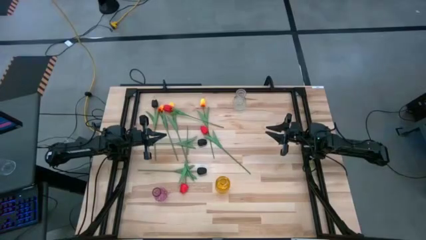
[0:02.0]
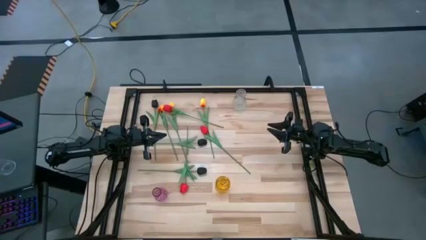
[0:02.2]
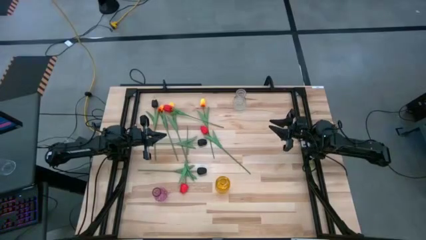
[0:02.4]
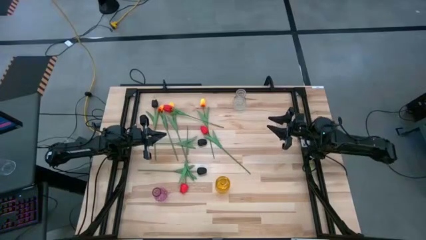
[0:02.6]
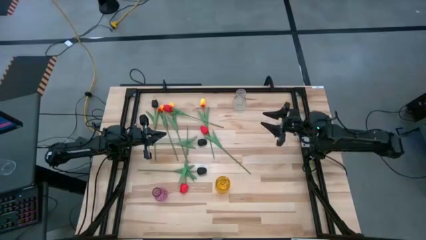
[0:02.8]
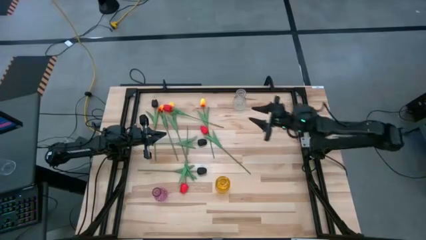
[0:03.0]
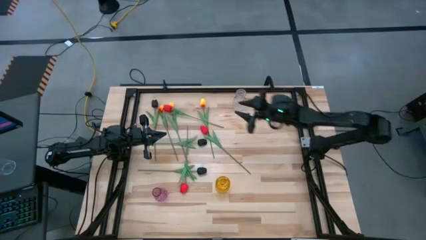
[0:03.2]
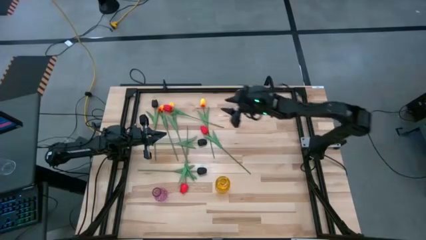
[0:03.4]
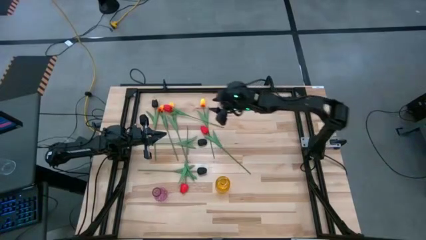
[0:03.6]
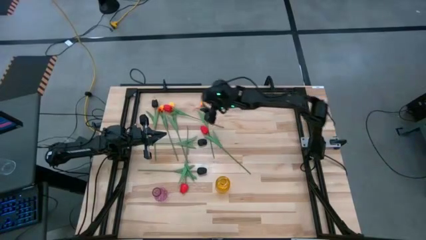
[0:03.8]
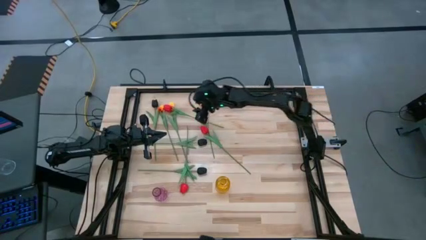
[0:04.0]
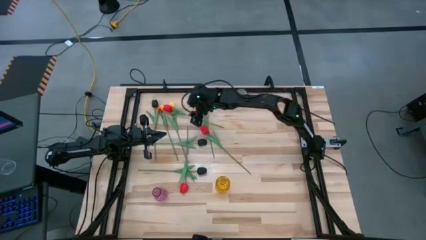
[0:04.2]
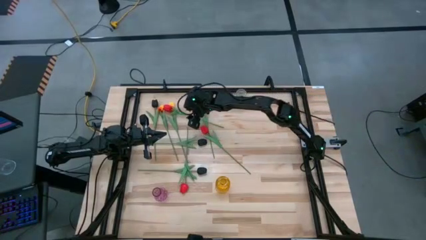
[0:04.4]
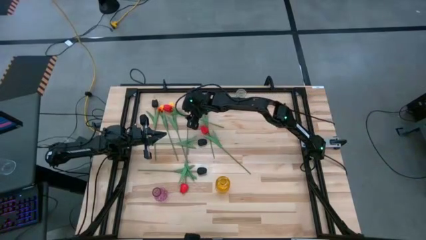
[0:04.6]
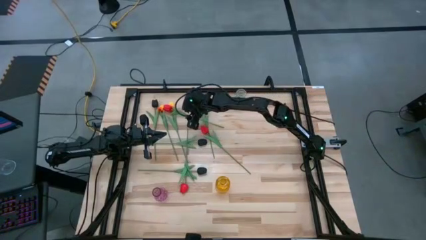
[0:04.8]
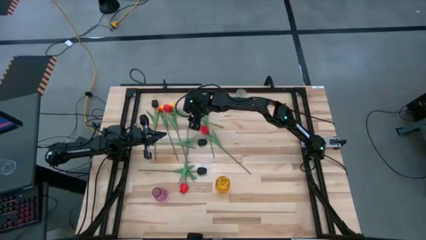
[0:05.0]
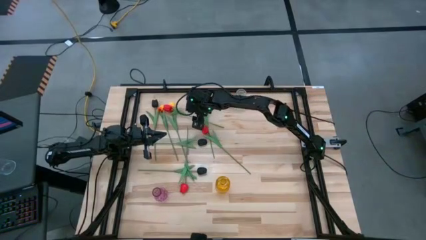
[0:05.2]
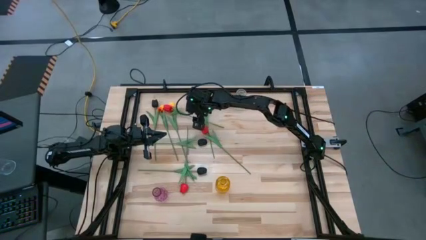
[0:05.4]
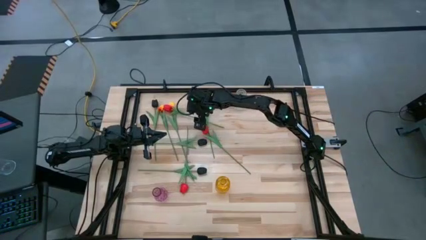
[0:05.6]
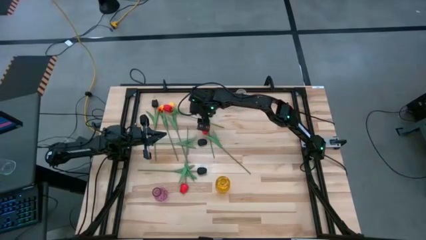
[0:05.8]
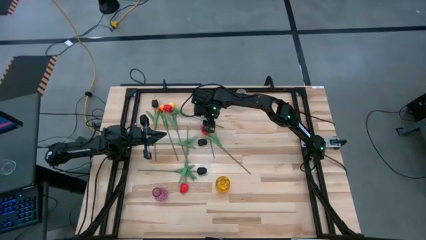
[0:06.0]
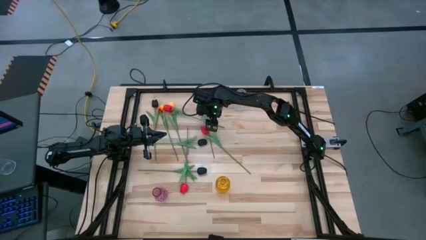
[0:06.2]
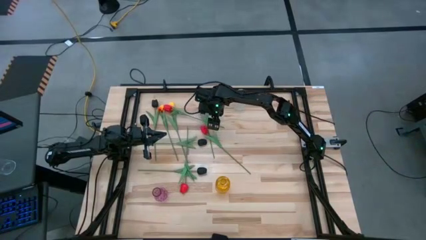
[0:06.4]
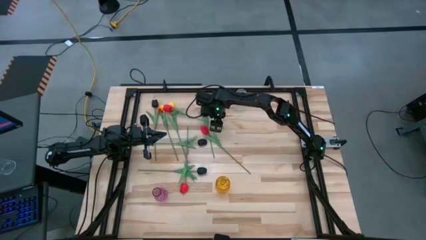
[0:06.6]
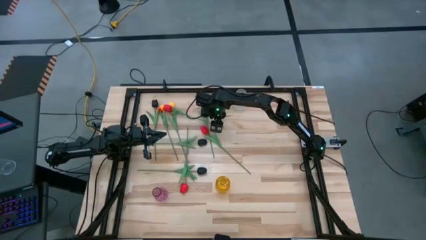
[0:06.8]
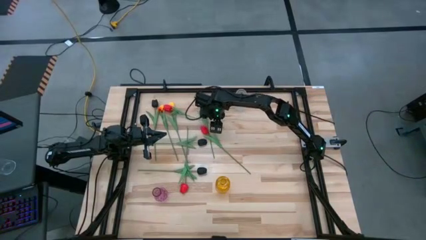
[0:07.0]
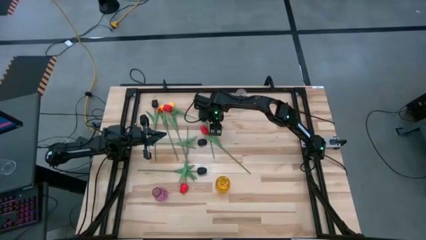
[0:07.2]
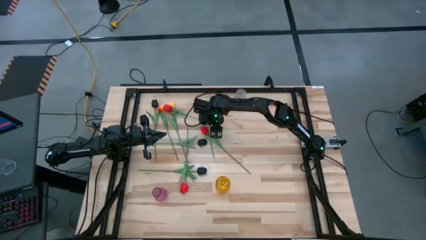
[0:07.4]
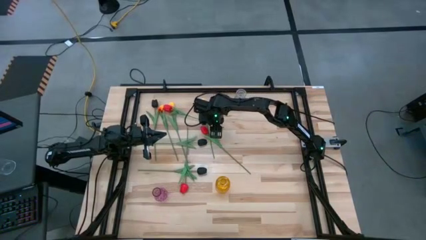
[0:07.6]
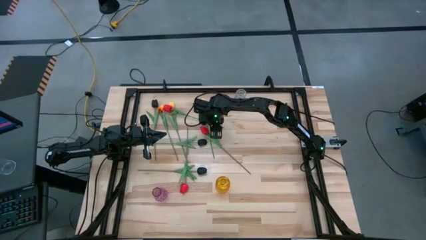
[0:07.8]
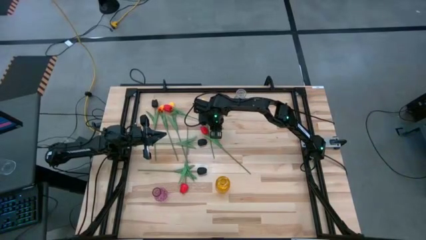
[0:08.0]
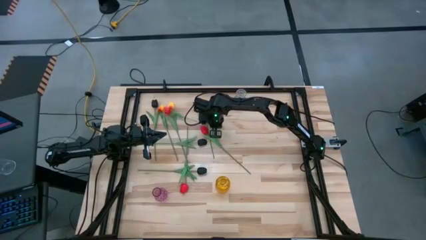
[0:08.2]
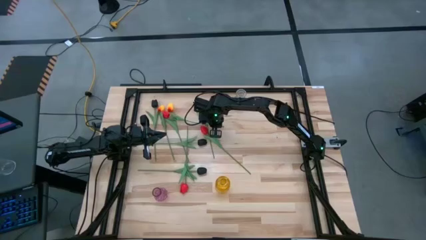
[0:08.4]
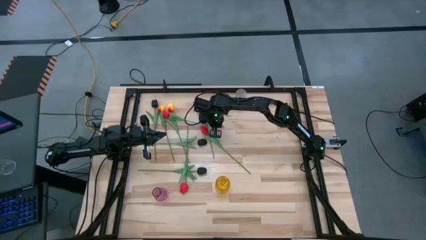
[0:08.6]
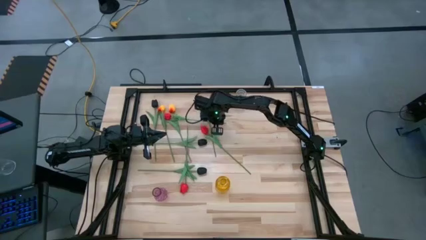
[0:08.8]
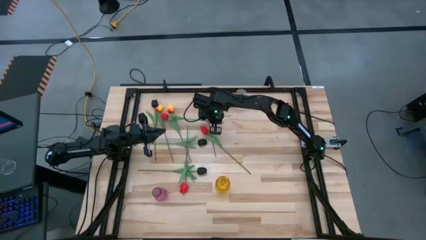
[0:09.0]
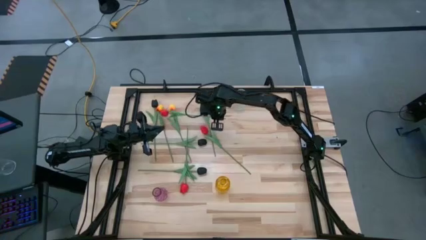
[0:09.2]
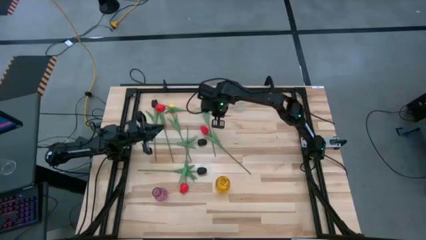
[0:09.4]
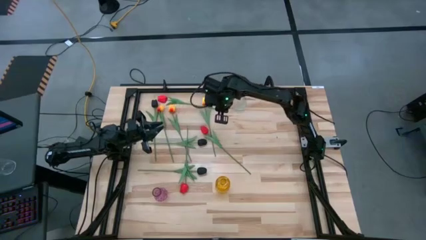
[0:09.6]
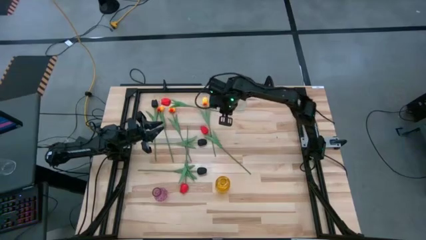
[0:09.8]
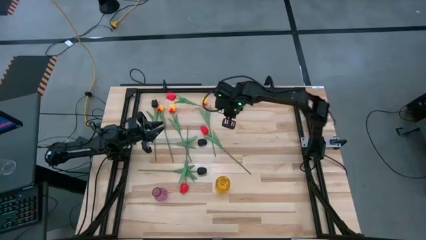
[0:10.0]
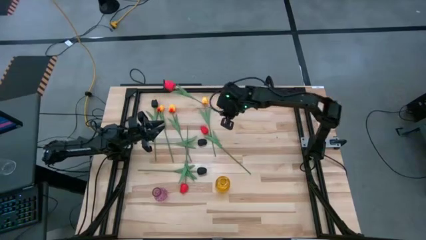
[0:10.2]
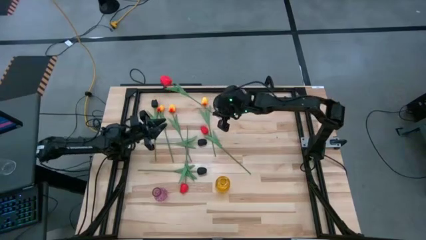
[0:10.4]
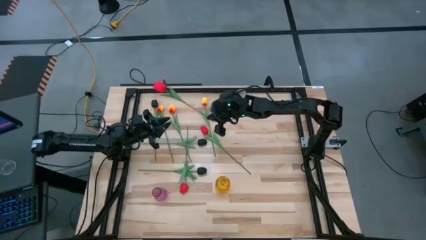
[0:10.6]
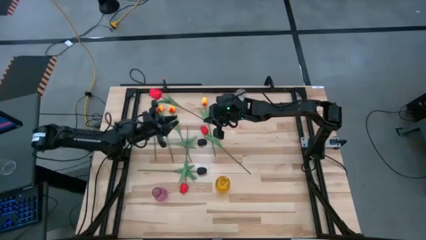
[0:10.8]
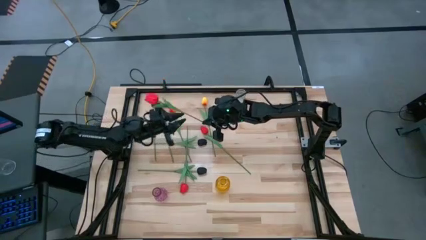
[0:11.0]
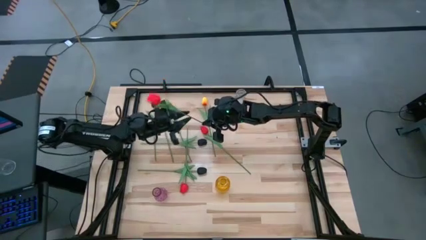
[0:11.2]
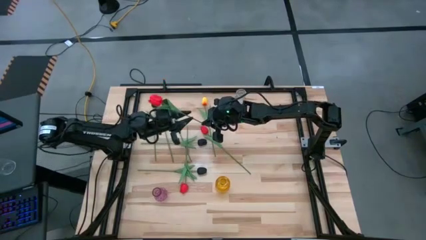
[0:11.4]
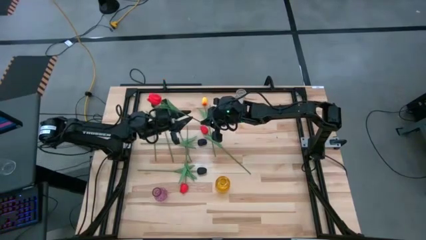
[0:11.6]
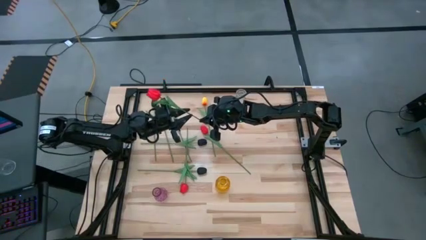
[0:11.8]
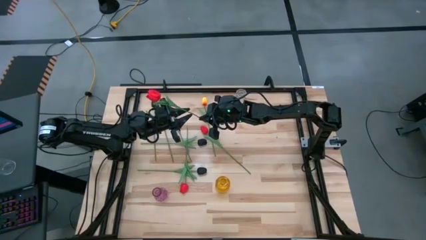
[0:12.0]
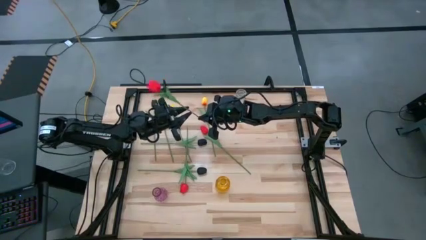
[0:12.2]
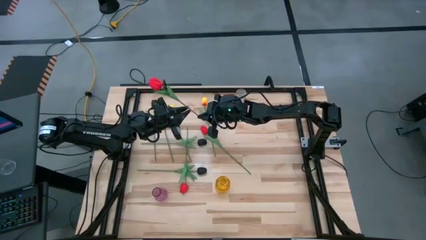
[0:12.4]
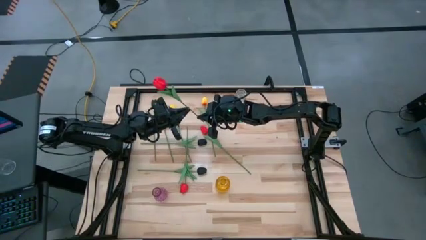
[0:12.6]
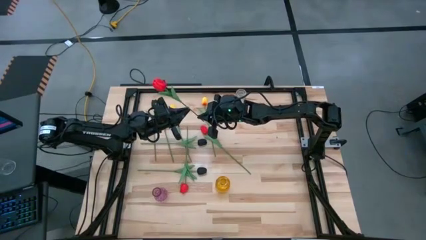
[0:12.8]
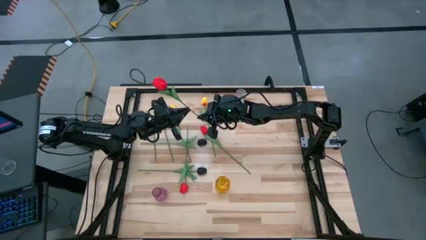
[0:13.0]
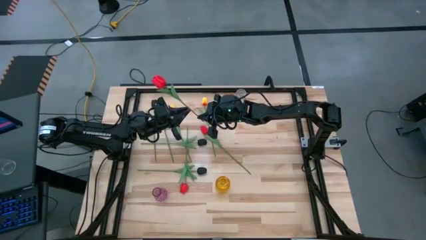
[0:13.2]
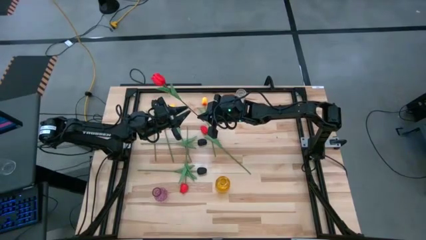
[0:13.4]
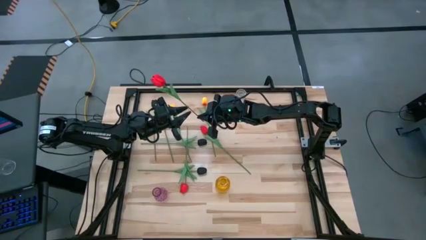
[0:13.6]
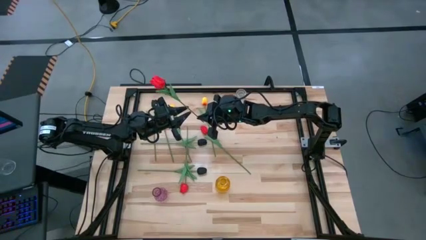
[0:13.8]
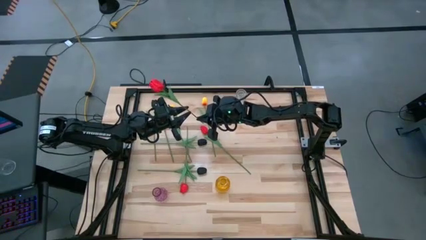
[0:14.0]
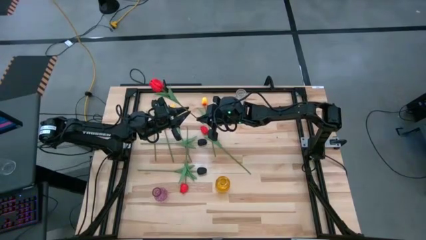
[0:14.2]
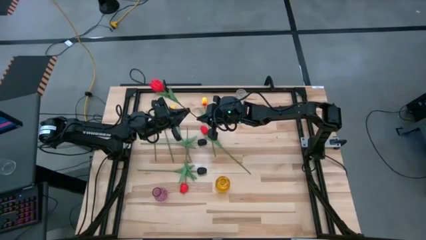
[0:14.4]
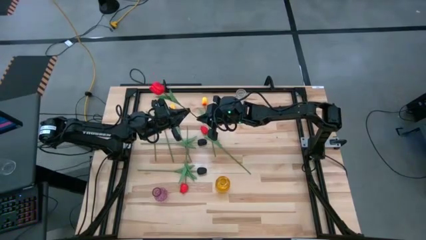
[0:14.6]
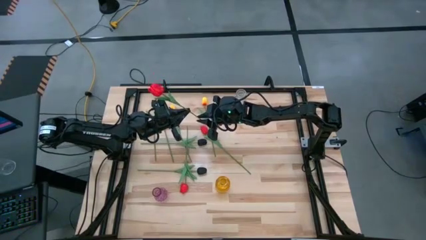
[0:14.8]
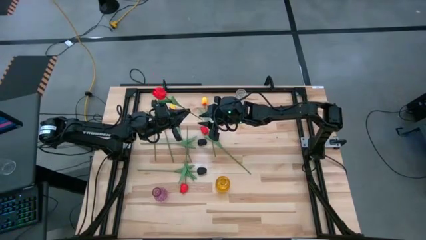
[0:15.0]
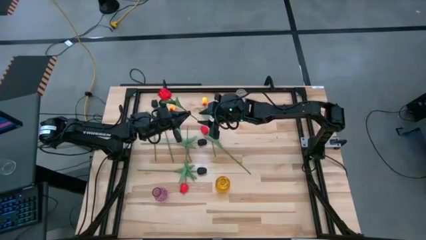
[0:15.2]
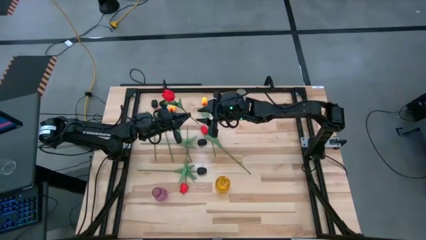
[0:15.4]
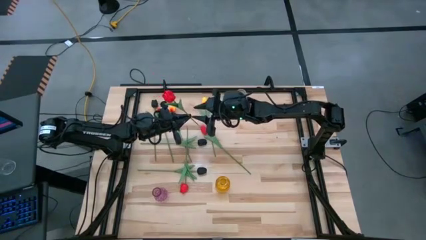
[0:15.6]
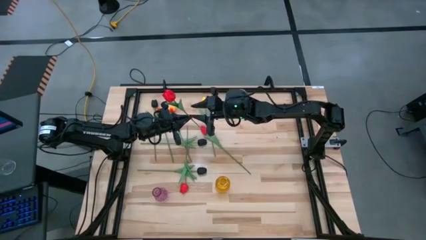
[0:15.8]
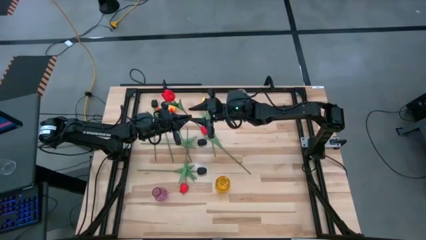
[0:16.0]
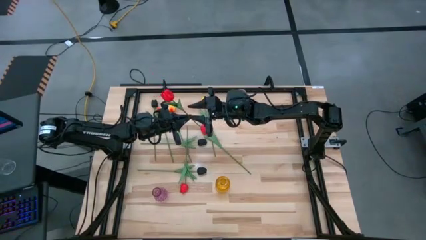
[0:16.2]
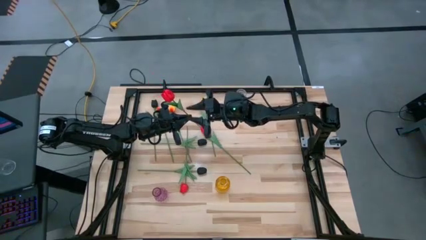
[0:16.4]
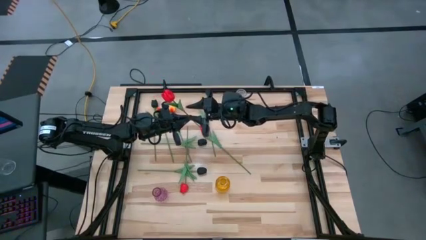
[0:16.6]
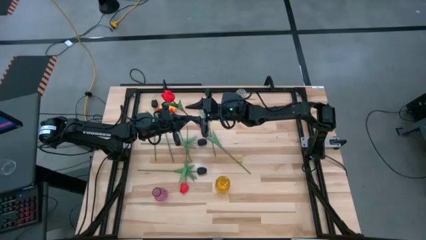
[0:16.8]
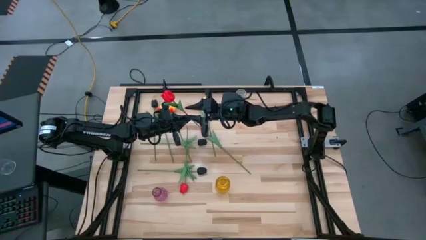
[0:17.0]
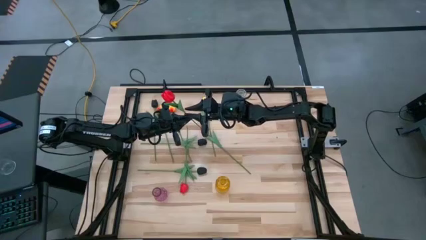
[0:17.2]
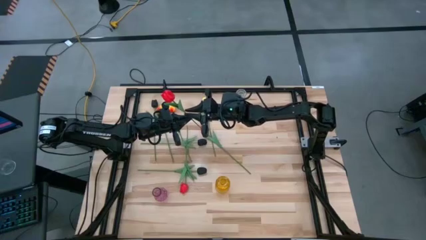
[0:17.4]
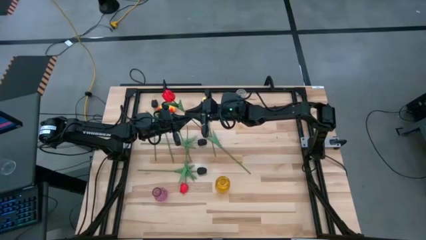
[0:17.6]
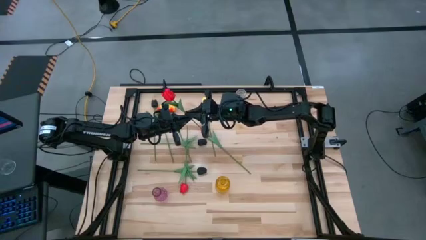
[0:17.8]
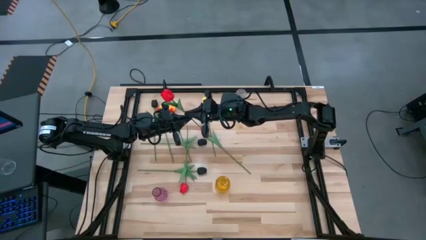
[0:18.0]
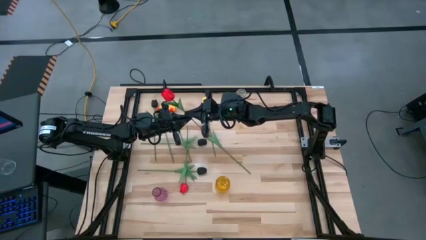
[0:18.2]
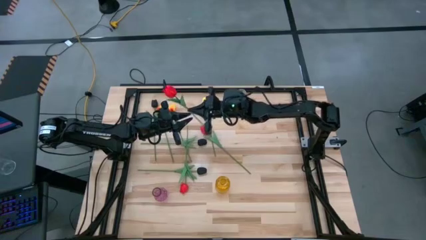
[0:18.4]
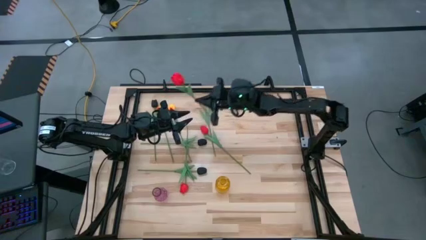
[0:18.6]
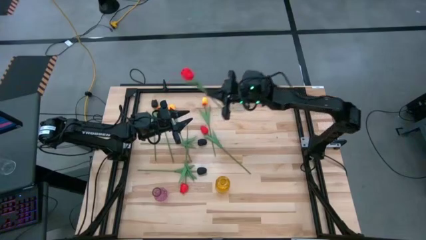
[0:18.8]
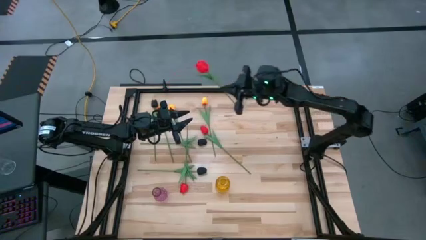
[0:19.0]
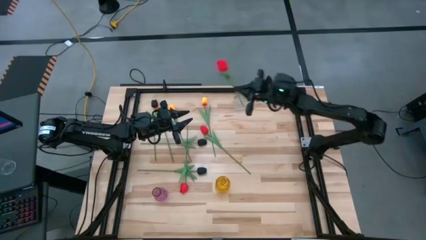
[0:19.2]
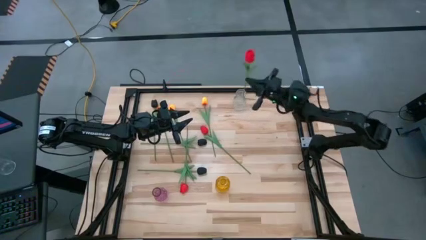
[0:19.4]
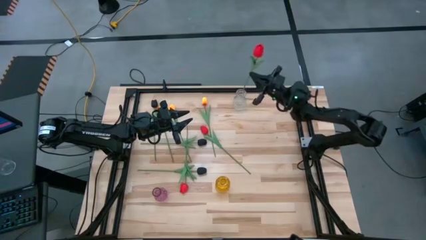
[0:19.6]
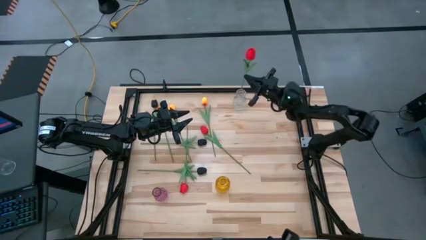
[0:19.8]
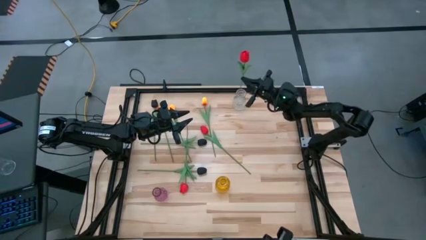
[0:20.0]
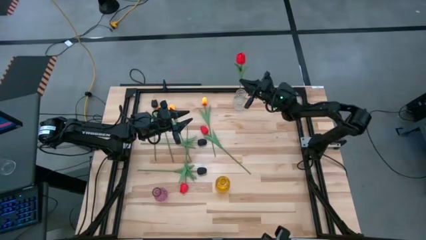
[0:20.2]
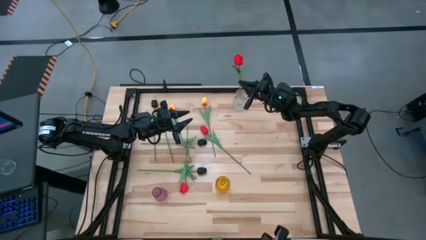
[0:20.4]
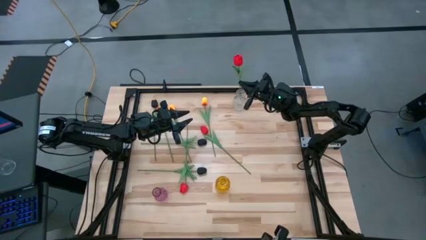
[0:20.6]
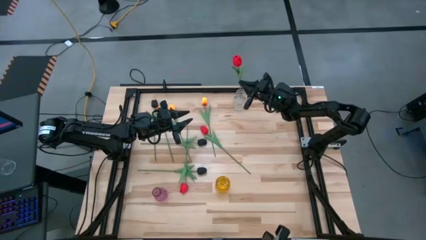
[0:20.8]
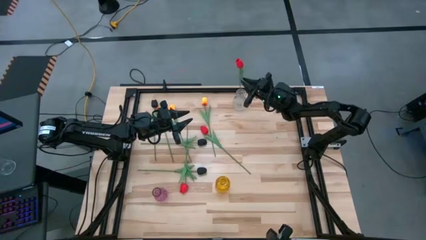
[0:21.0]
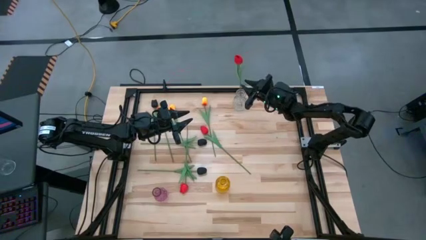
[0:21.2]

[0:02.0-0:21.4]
Task: Sort flowers into vase by color
Put the top red flower into the transparent vase
